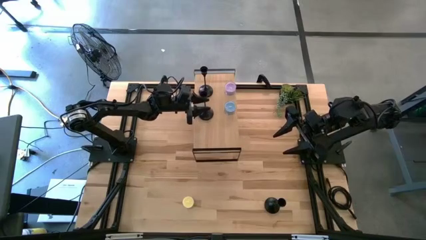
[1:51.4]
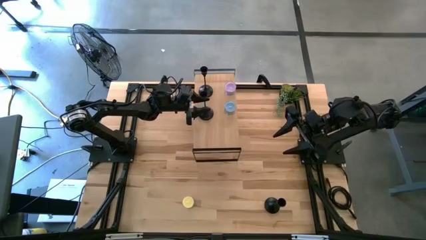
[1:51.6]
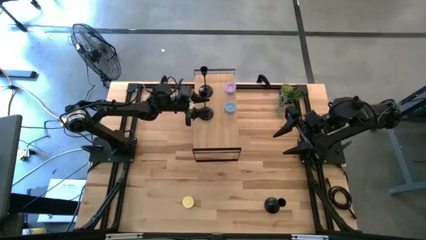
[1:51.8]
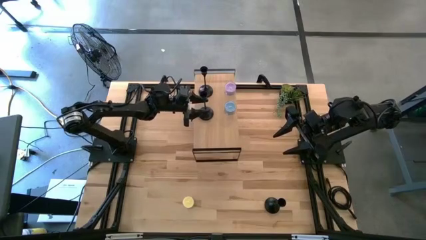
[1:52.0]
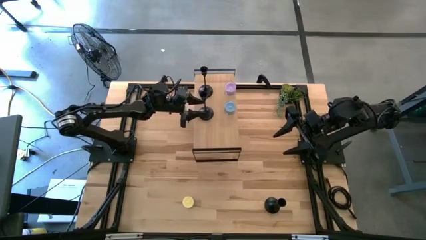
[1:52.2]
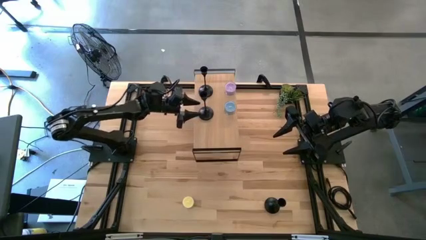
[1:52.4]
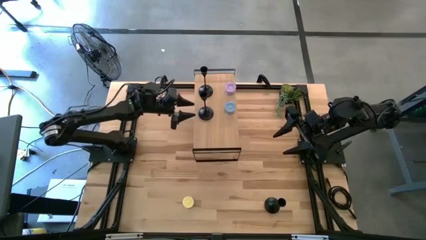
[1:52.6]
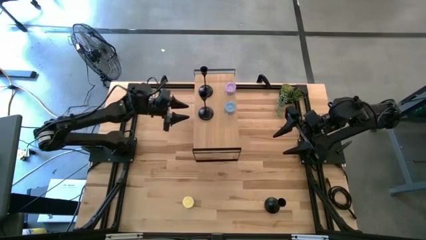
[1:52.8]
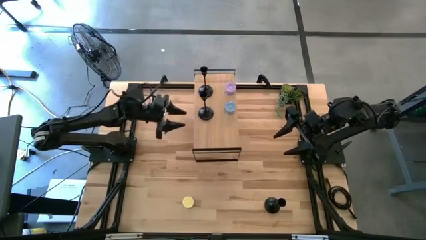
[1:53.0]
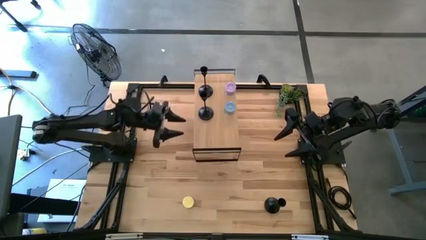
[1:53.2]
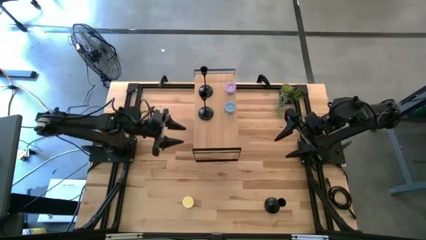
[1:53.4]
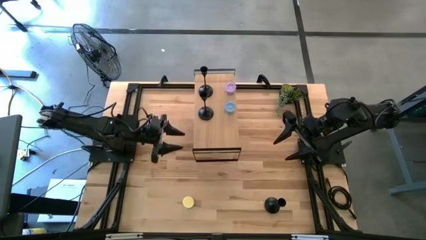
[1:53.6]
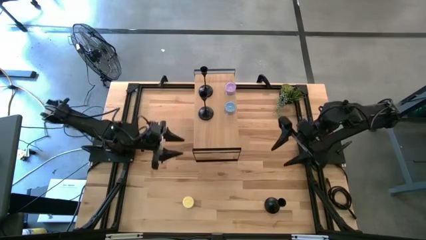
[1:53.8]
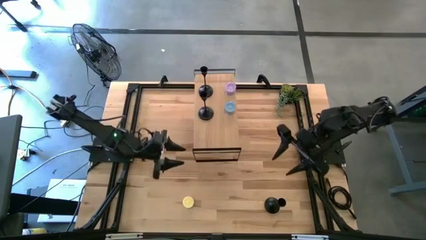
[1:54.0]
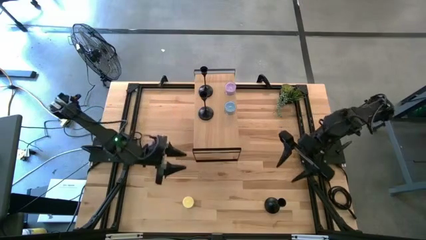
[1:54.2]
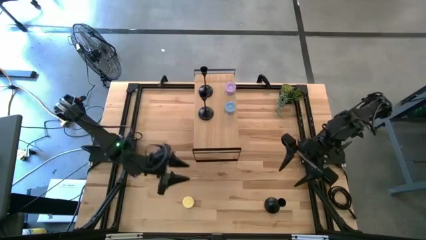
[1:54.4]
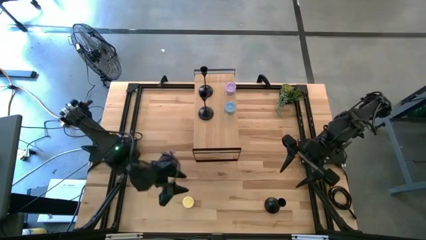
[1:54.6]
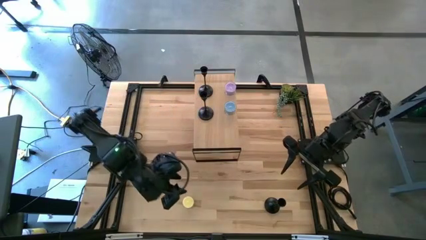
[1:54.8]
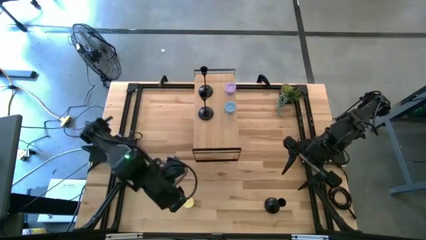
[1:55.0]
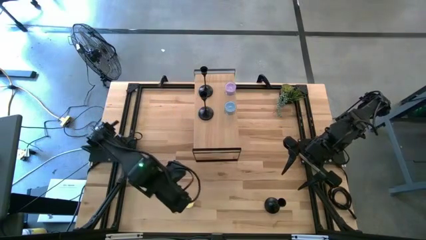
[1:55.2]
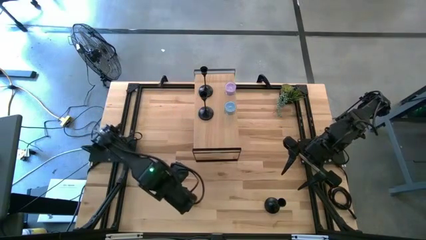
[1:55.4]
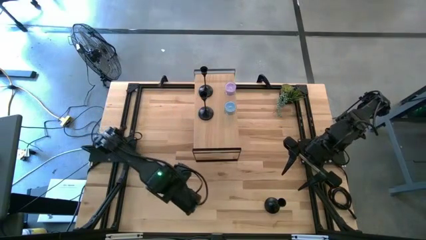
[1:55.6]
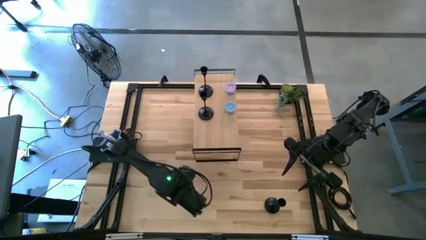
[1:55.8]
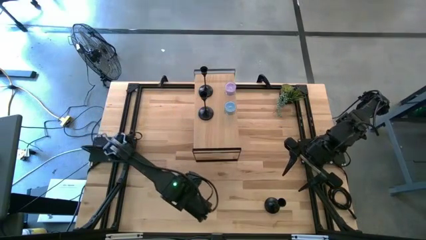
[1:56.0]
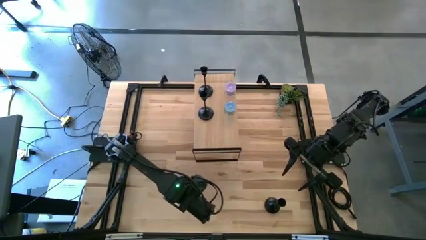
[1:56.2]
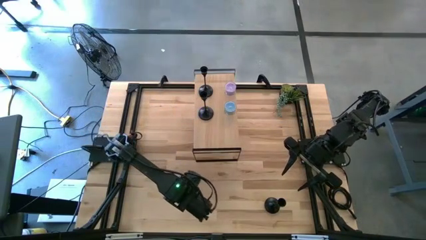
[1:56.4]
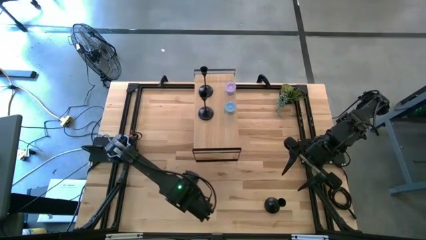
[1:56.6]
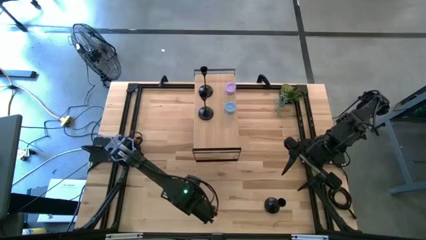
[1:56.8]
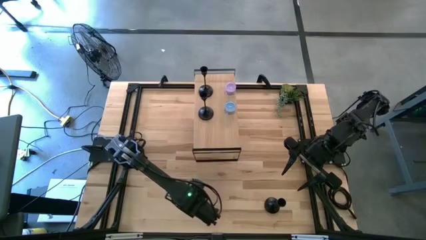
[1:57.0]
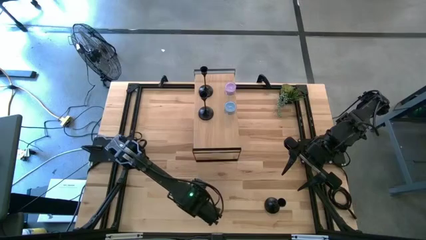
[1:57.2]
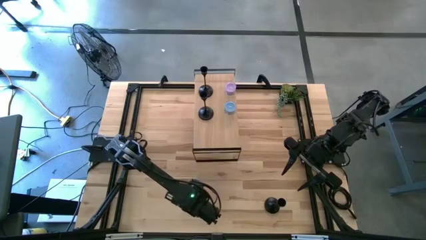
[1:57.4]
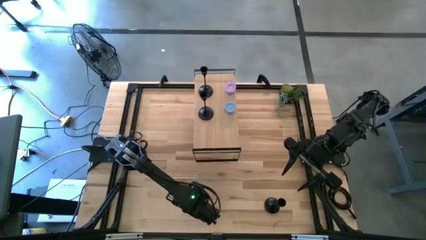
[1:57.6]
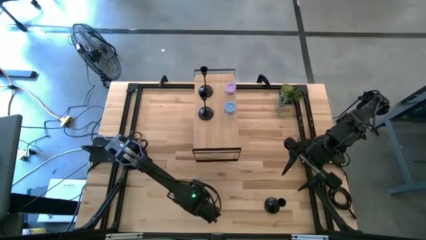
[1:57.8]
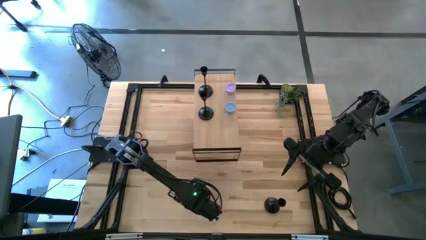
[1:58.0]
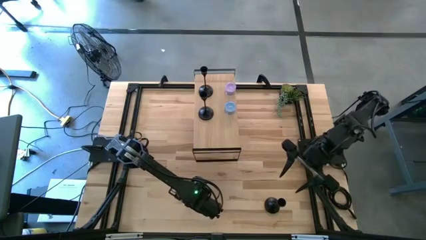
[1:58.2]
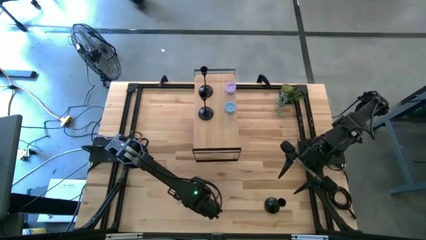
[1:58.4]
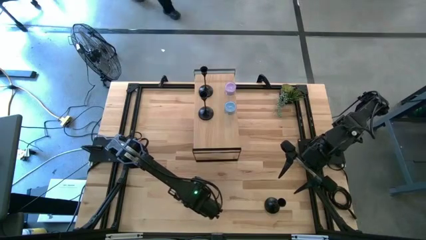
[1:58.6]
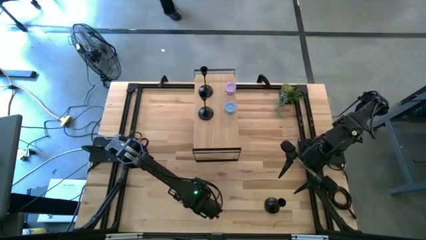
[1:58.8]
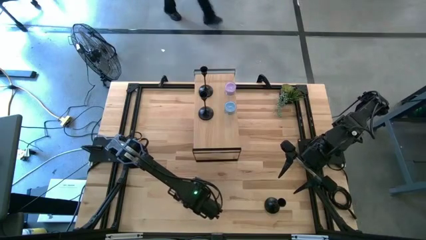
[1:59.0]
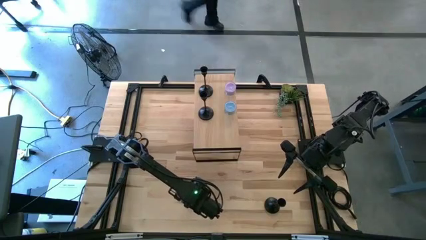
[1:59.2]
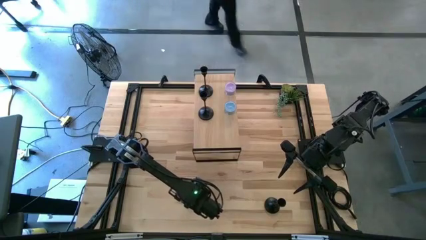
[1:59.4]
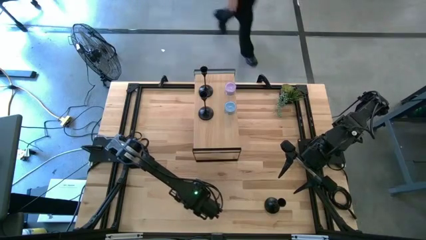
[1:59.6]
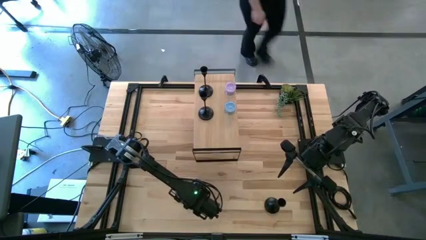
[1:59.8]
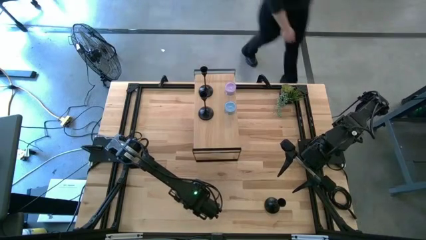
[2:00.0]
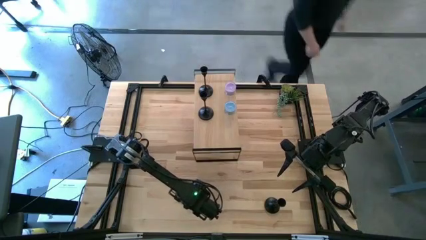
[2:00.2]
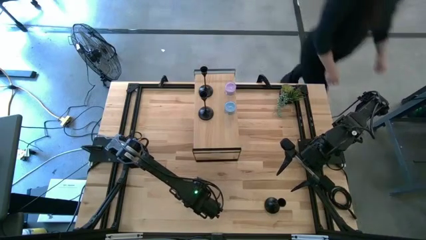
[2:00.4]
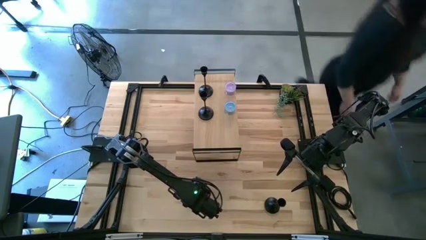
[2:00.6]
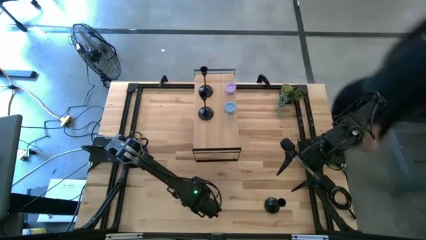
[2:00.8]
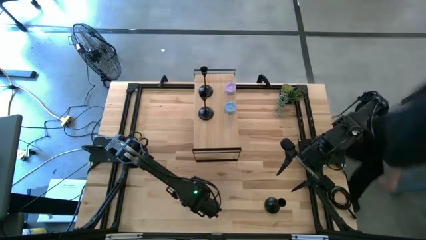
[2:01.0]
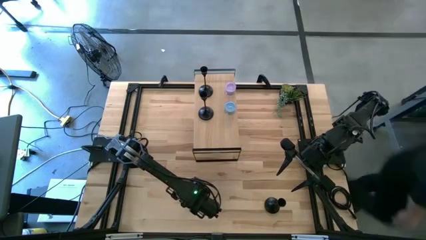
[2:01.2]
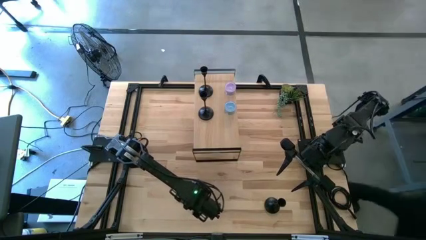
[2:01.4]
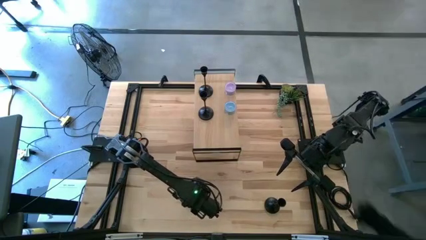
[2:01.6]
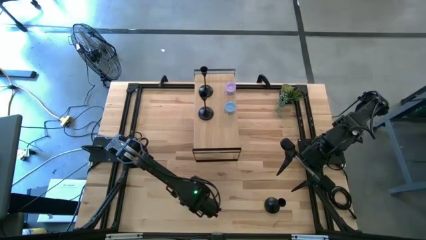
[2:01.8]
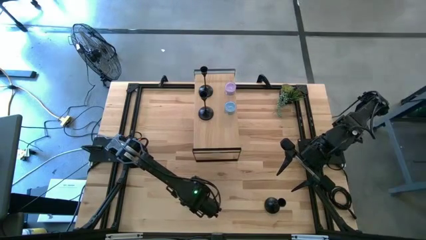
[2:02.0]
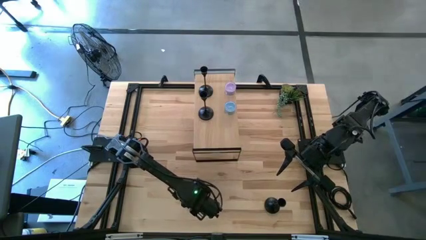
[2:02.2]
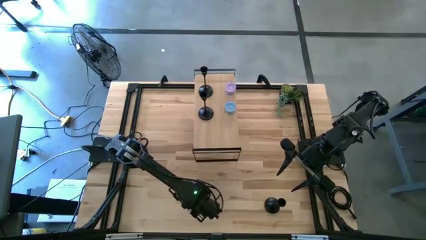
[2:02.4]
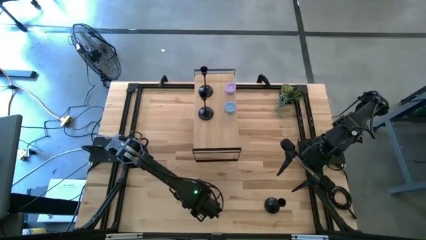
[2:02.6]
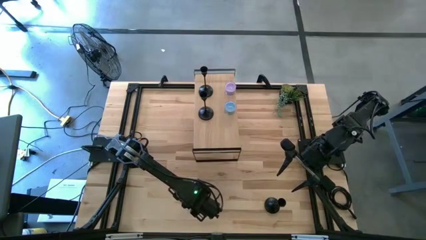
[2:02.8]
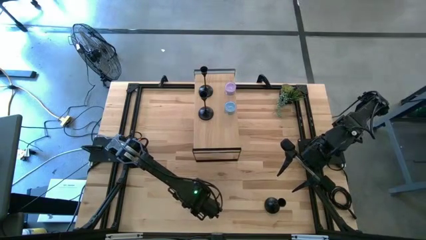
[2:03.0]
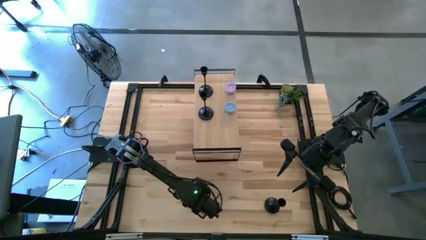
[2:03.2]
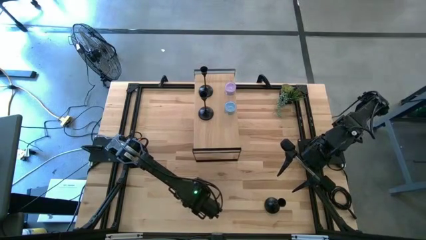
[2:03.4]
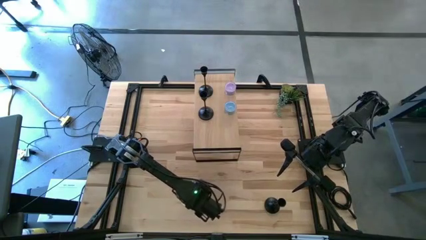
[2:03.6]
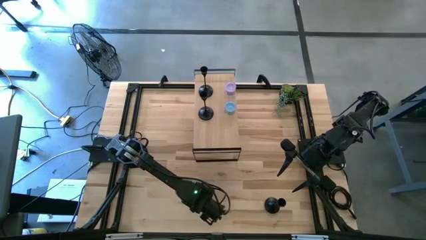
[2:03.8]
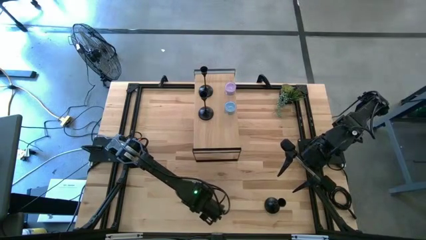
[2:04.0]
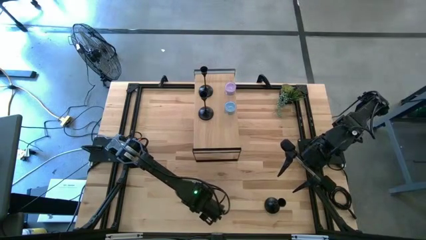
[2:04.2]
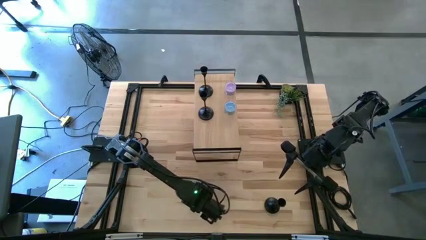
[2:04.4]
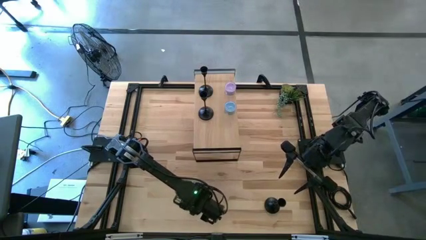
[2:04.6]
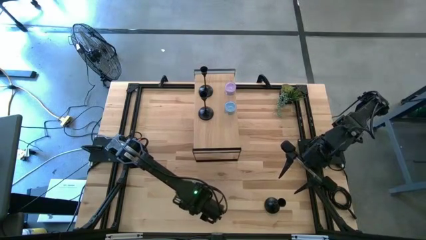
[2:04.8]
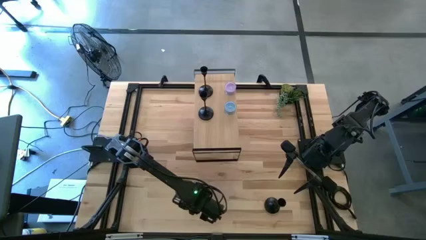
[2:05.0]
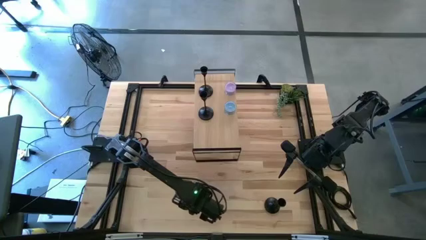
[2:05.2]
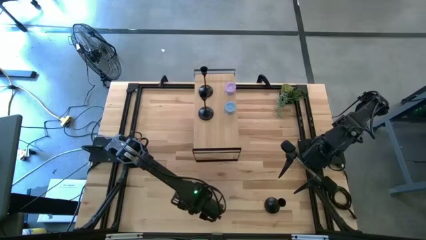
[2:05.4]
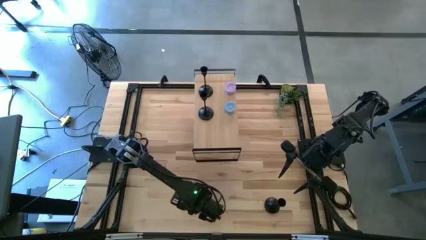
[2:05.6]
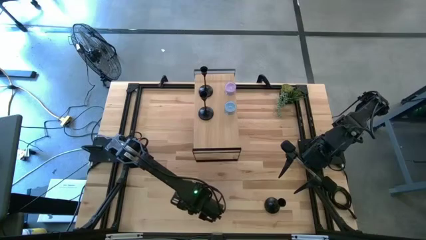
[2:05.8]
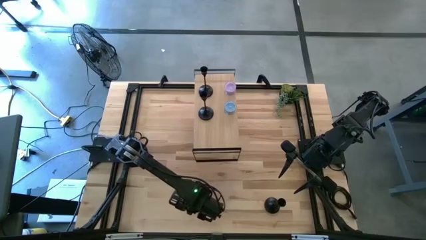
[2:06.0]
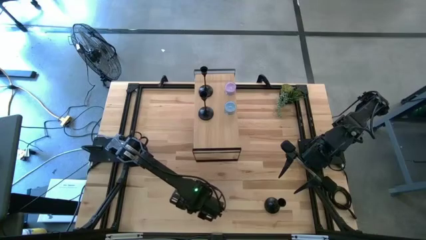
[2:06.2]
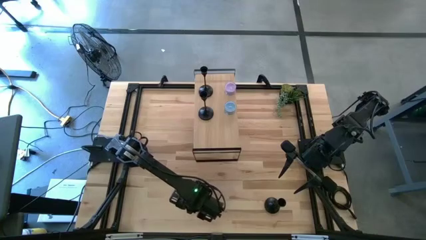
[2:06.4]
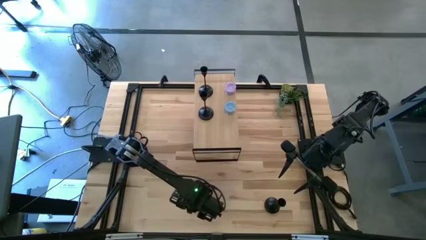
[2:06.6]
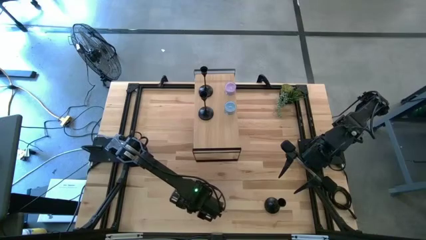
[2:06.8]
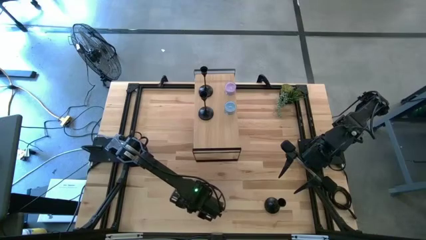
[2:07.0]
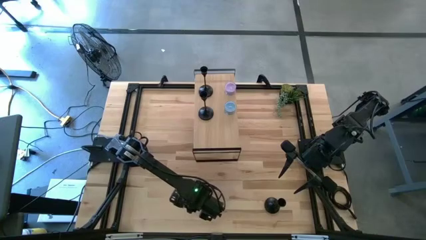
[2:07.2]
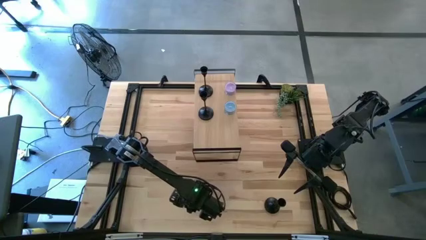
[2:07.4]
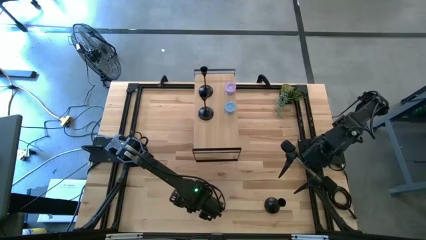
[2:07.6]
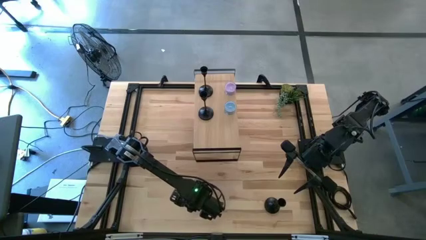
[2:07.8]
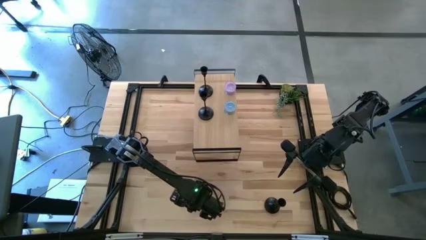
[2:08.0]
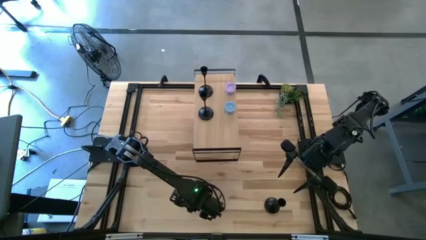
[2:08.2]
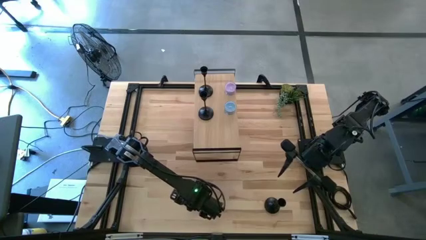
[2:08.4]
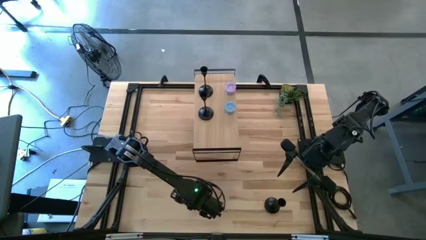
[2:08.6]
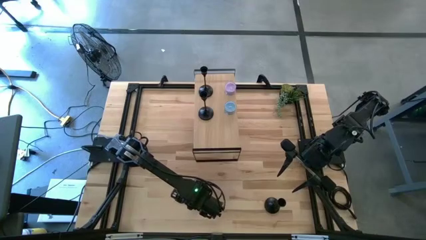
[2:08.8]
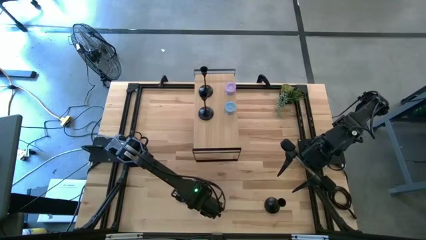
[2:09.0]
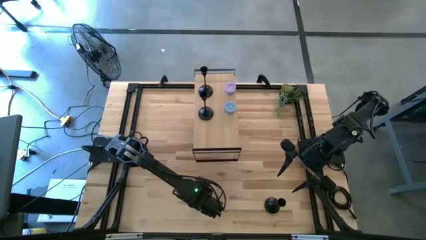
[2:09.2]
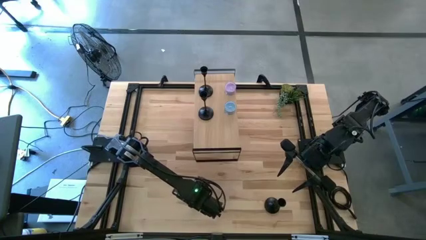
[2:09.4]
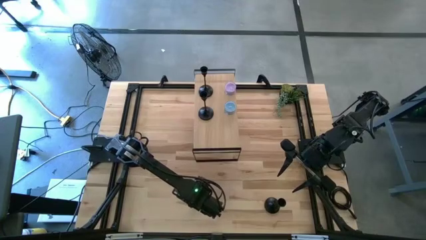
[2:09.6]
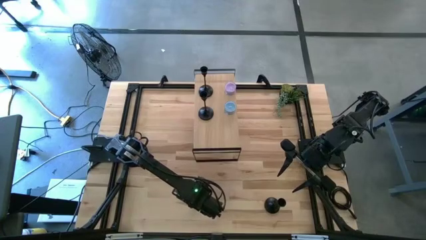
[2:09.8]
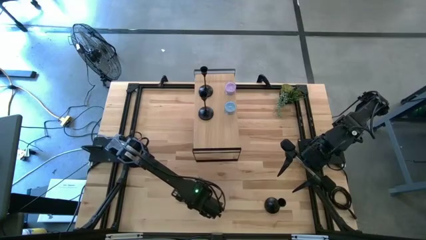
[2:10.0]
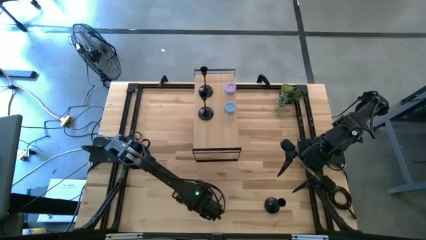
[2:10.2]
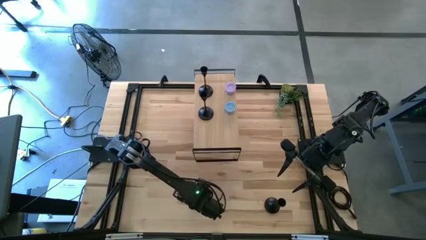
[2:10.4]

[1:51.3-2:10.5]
Task: Pick & Place candle stick holders
Put the yellow scented candle on the shelf
